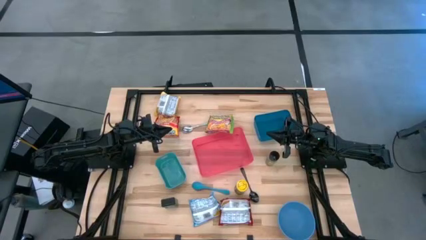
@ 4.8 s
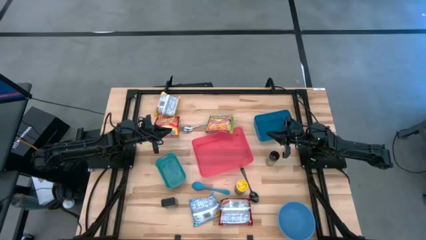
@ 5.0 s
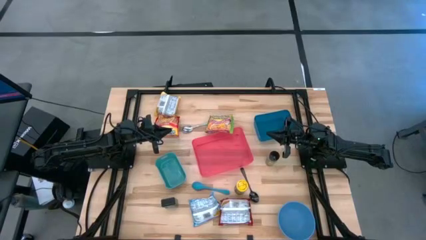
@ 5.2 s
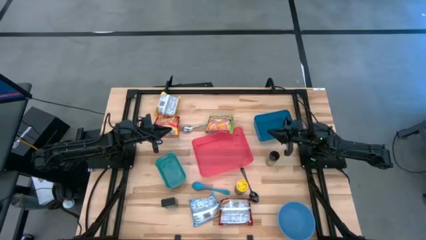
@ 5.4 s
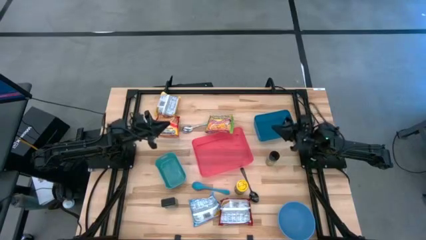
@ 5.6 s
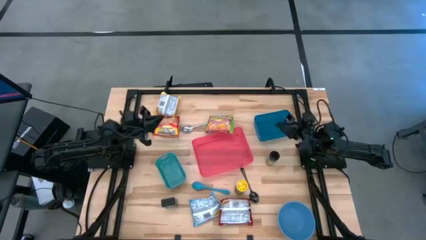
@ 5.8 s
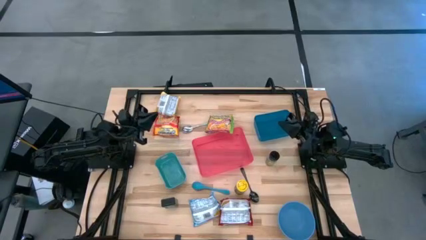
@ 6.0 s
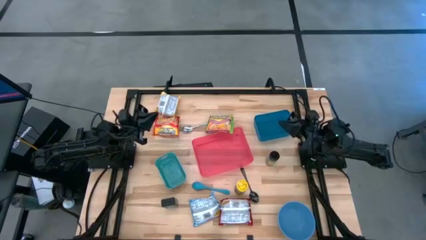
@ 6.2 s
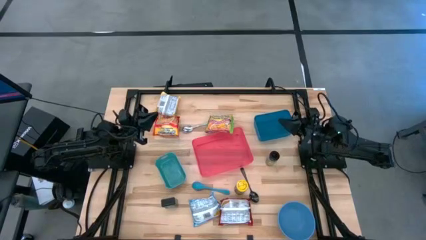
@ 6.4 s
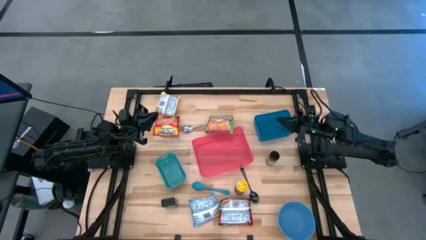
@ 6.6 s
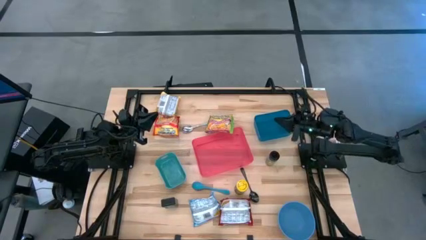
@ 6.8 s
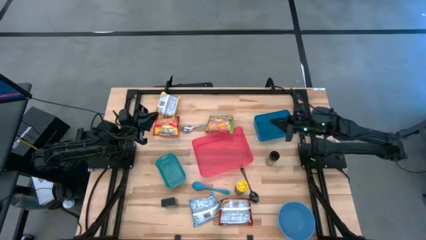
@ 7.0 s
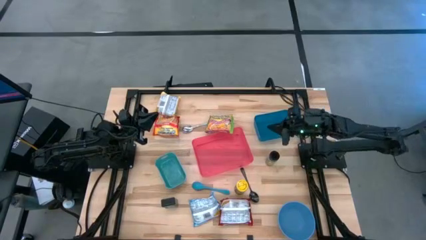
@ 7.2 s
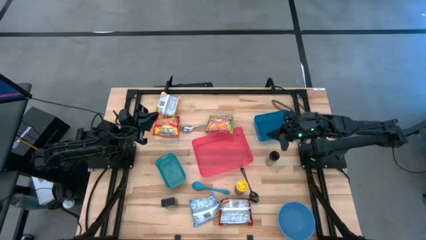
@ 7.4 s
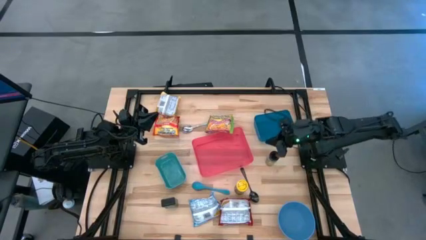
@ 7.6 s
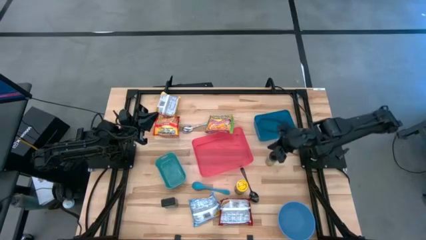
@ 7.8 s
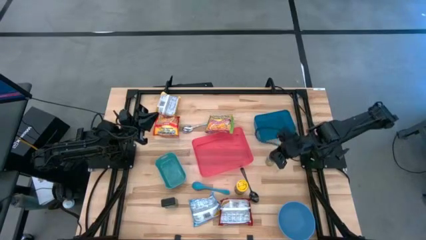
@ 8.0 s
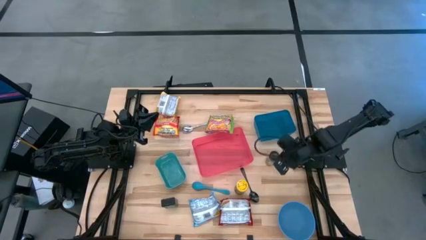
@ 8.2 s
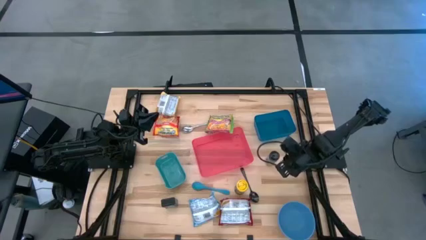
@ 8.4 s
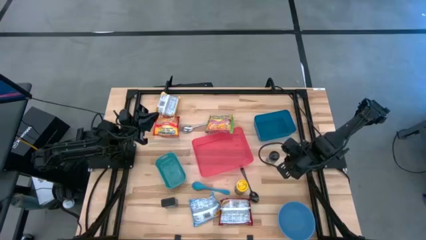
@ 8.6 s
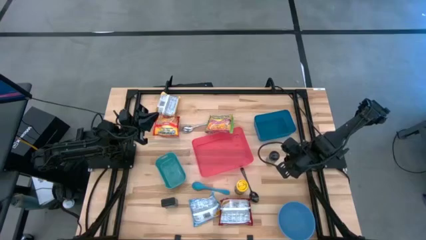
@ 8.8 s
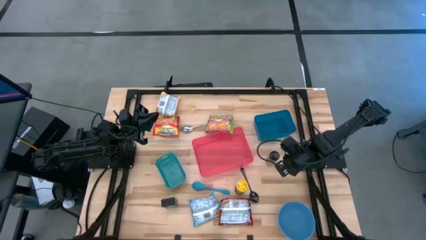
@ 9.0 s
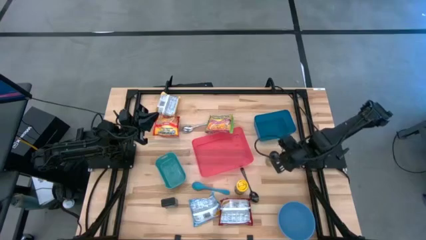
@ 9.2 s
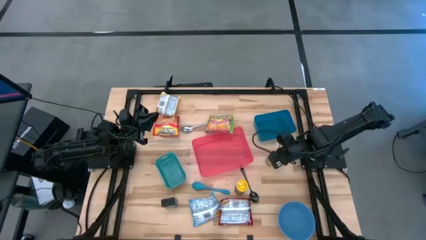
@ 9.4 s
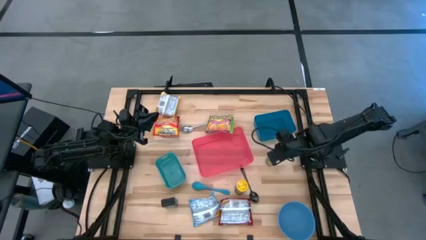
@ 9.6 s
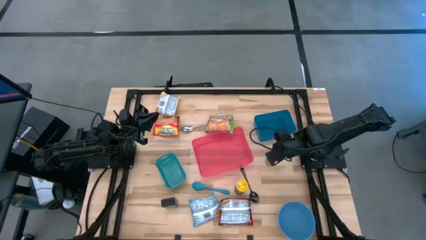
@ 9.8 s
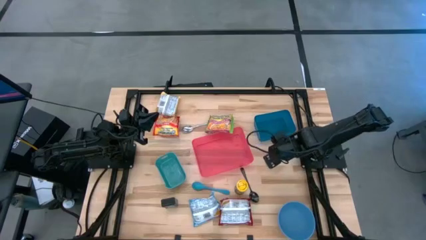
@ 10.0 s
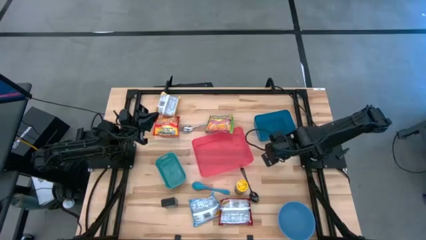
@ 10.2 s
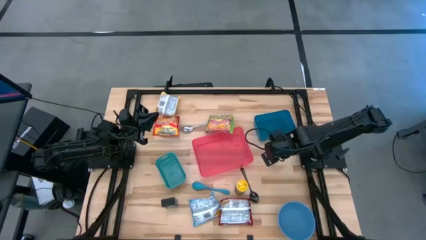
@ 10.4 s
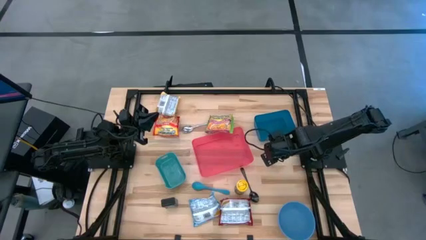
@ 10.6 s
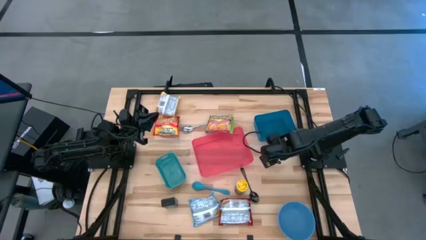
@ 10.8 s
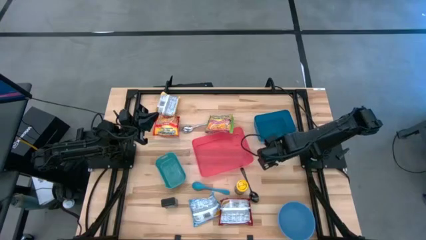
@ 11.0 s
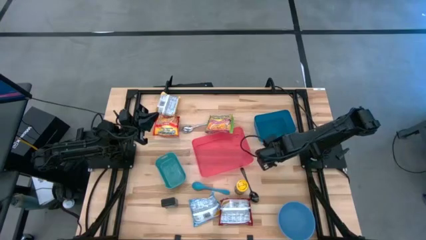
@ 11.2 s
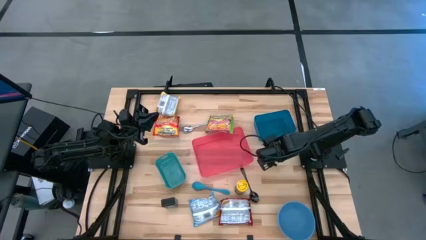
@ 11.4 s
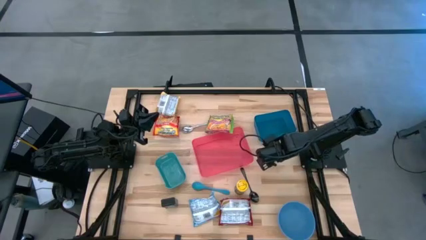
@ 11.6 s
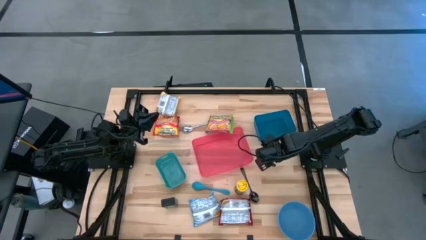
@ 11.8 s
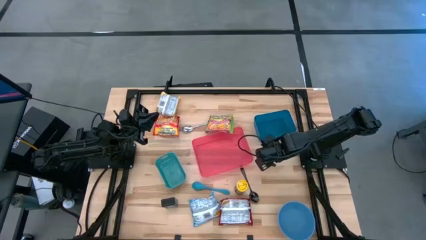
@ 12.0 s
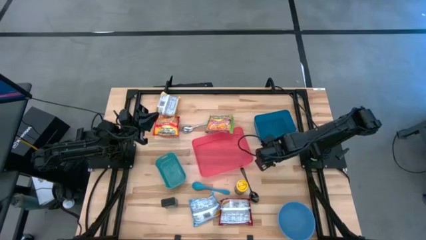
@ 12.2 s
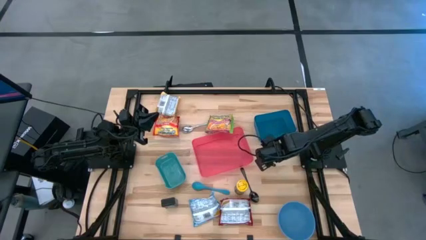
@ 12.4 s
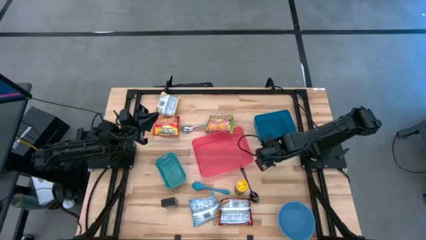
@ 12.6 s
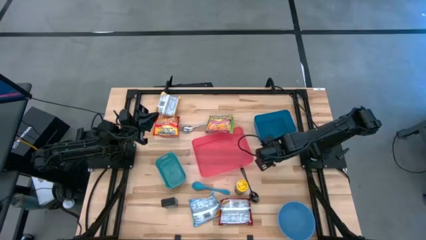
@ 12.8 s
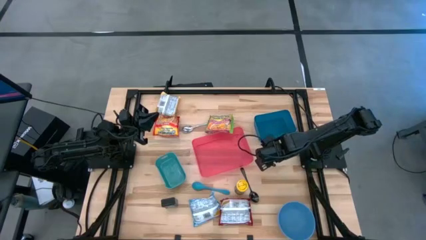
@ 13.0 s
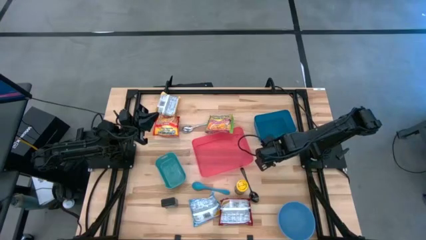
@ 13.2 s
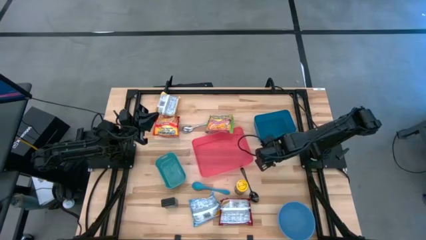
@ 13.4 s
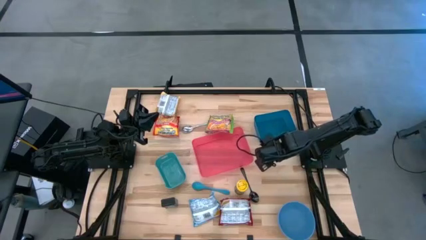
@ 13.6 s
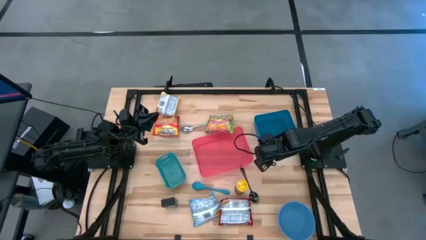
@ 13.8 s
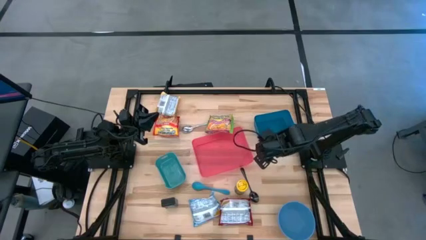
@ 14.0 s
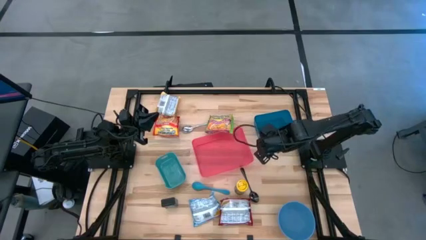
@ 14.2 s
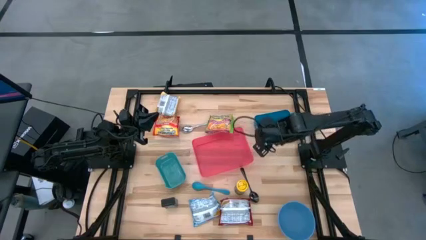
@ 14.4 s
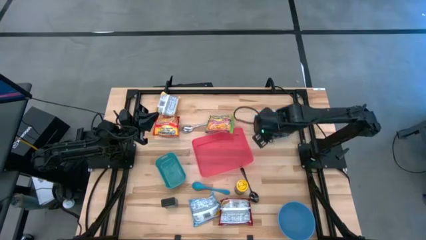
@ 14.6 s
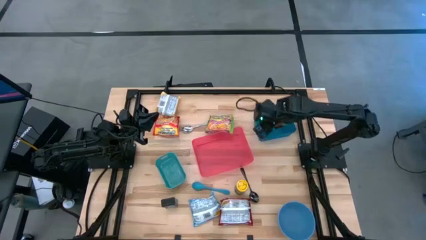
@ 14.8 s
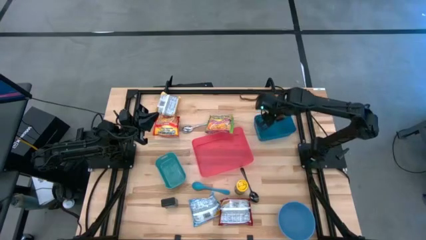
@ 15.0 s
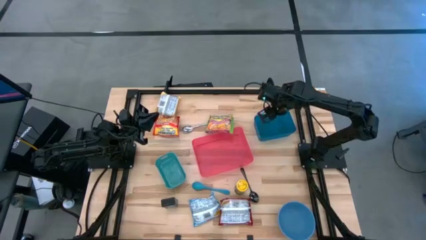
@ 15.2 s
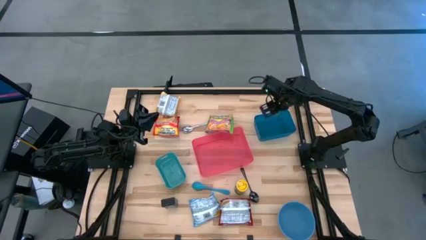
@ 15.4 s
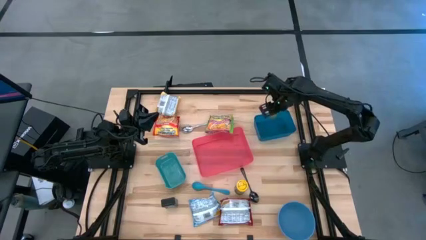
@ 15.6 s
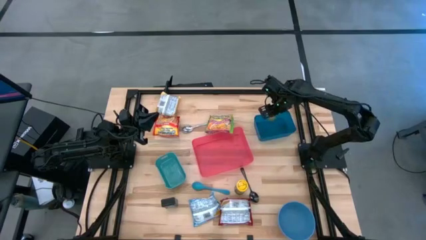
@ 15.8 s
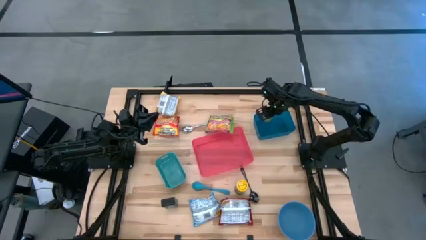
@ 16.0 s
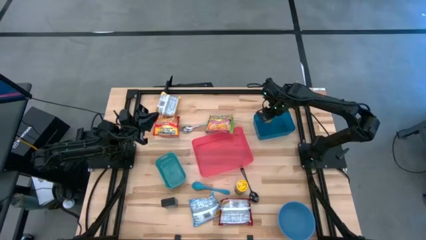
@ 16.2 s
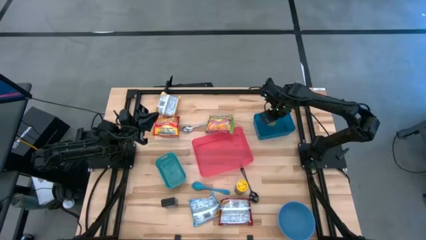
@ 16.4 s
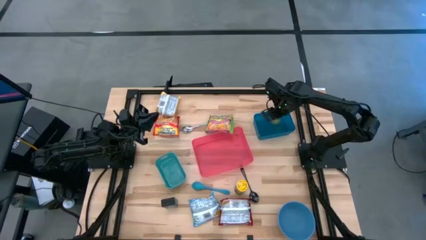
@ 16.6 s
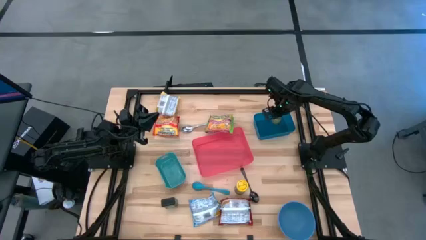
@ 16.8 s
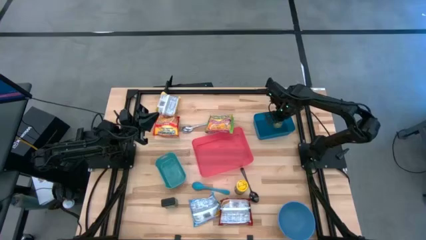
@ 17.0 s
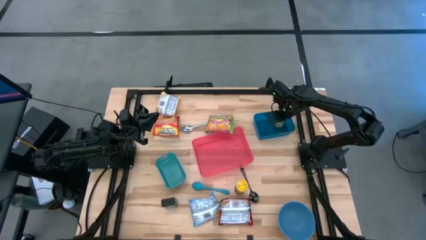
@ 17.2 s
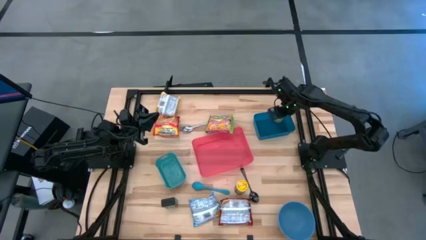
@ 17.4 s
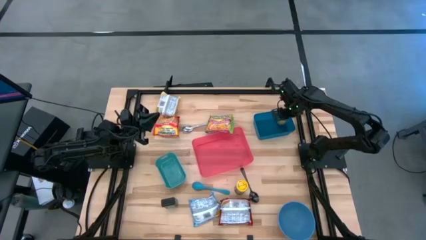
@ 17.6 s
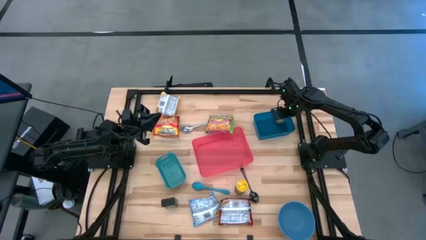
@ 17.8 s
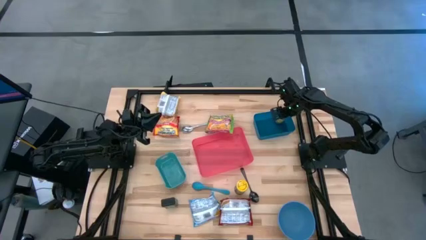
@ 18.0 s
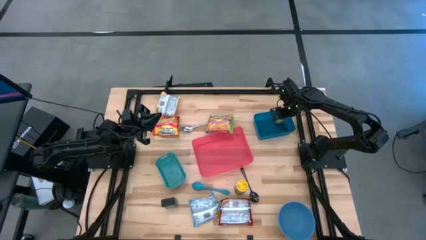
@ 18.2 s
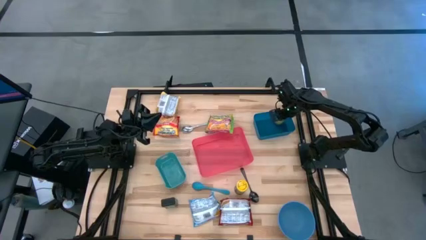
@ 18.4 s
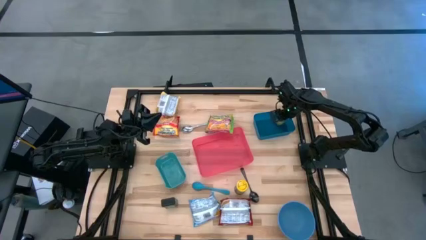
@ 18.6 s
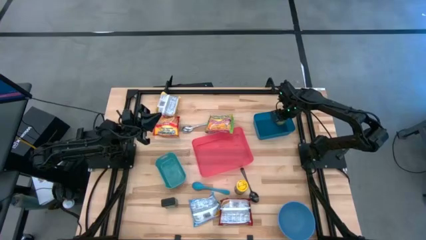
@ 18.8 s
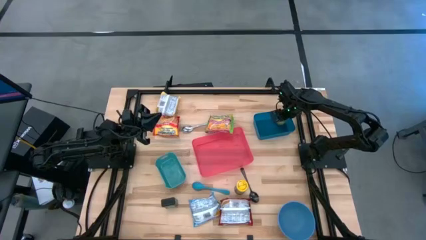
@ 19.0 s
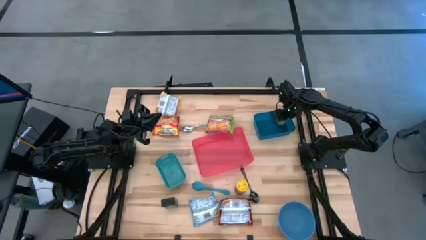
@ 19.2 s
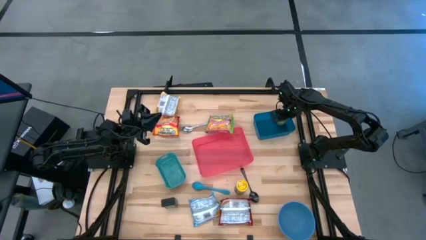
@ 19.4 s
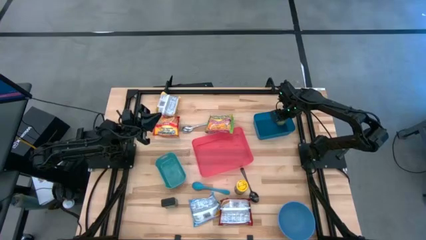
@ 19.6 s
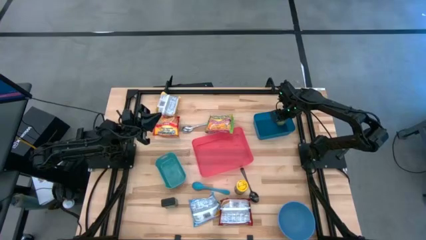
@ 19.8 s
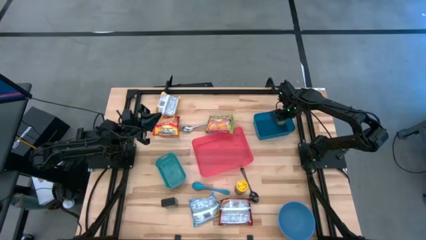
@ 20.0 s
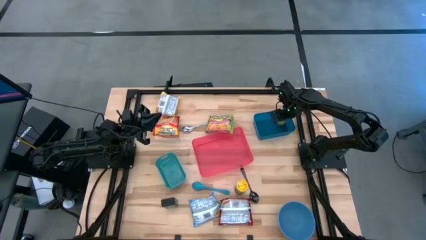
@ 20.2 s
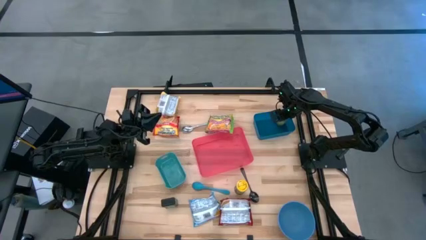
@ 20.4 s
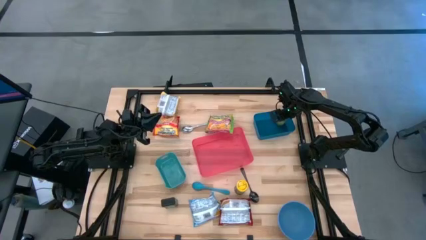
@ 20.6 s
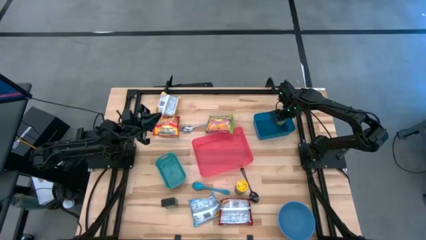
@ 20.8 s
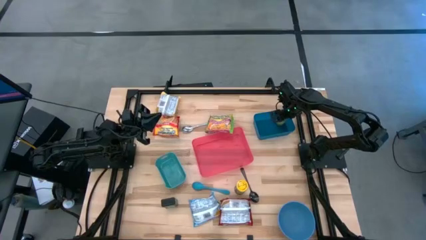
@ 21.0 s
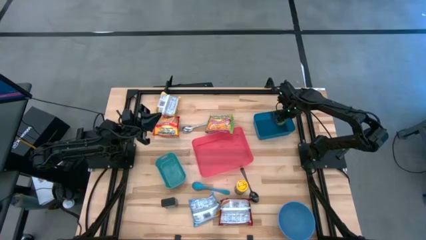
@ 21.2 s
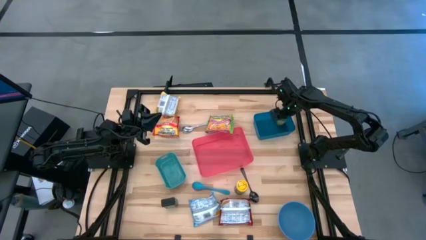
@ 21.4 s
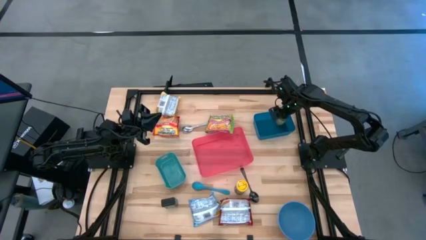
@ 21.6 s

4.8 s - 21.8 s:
Task: Pick & Place Food Item
Put the green seasoning bottle into the blue bin
